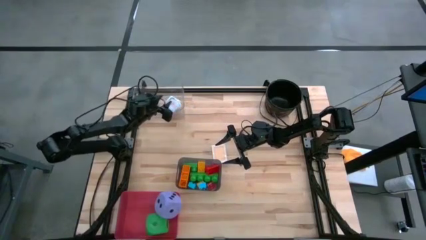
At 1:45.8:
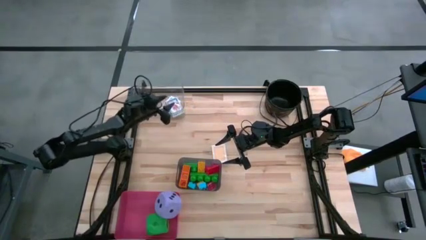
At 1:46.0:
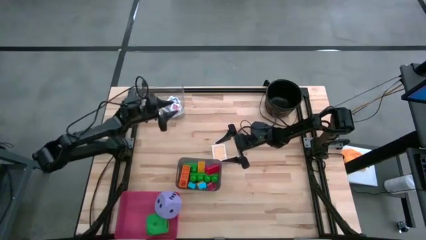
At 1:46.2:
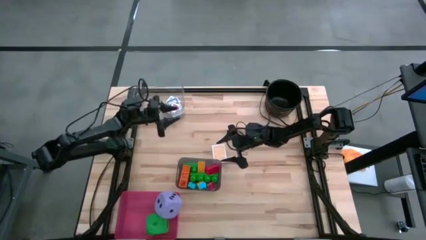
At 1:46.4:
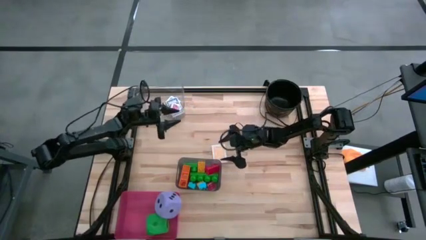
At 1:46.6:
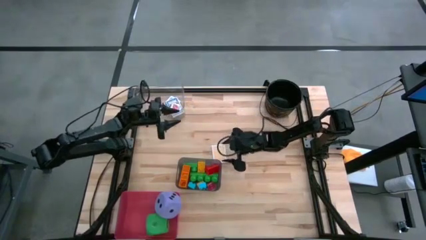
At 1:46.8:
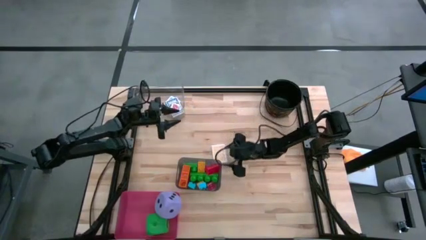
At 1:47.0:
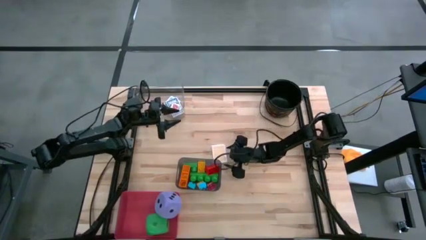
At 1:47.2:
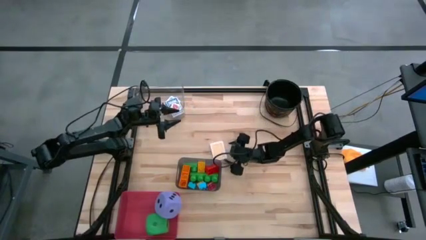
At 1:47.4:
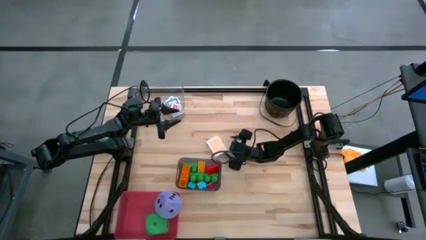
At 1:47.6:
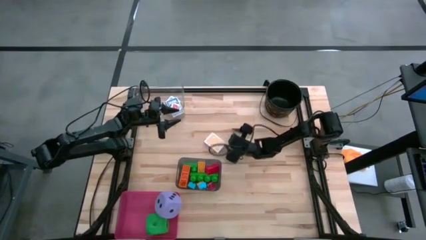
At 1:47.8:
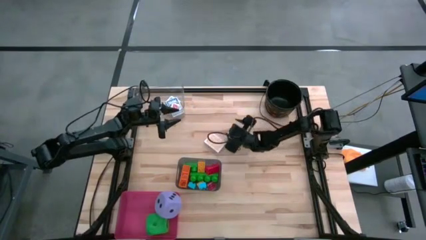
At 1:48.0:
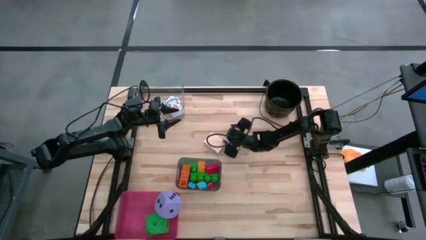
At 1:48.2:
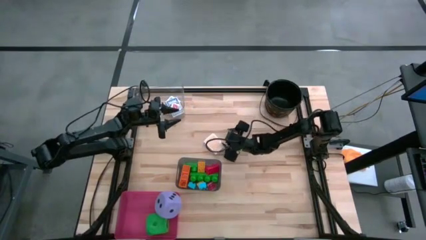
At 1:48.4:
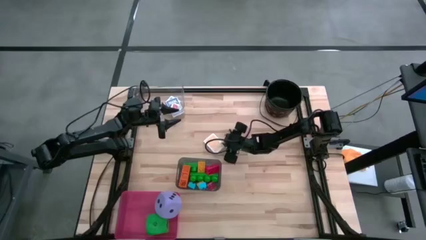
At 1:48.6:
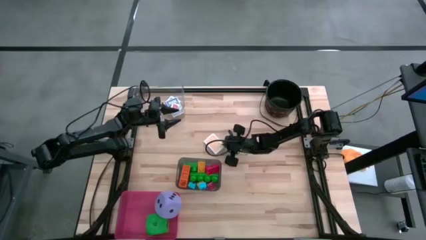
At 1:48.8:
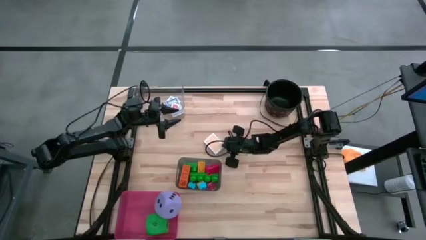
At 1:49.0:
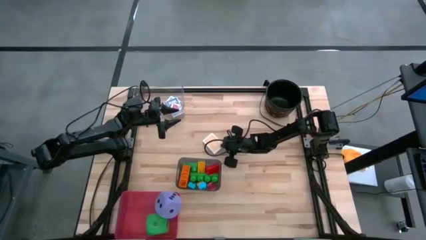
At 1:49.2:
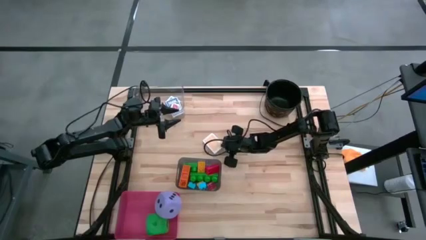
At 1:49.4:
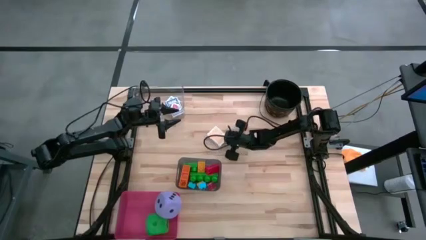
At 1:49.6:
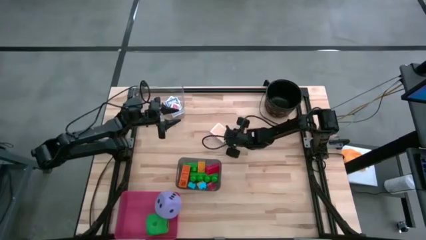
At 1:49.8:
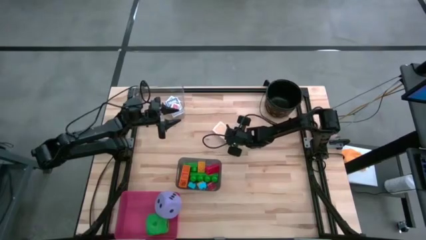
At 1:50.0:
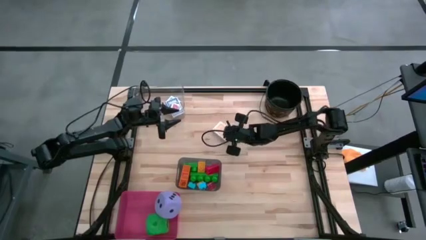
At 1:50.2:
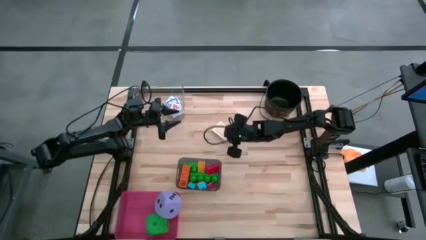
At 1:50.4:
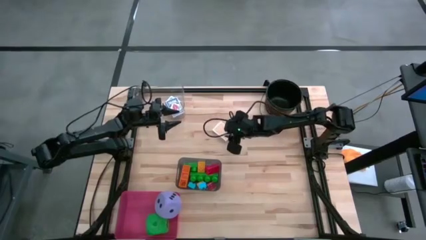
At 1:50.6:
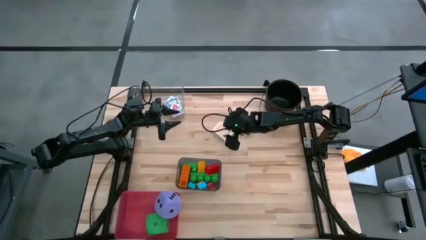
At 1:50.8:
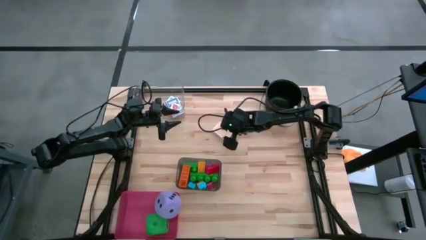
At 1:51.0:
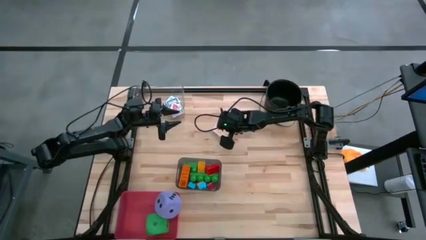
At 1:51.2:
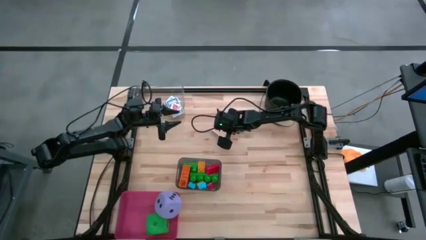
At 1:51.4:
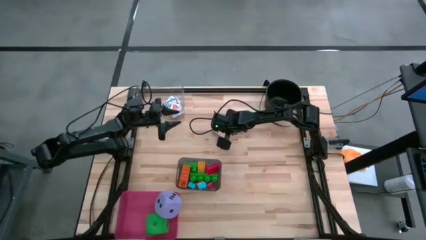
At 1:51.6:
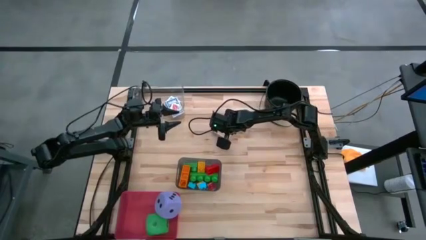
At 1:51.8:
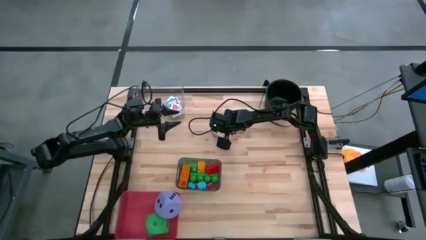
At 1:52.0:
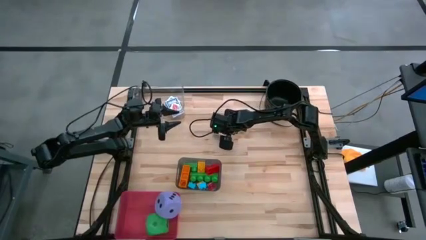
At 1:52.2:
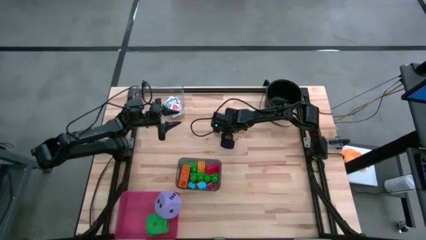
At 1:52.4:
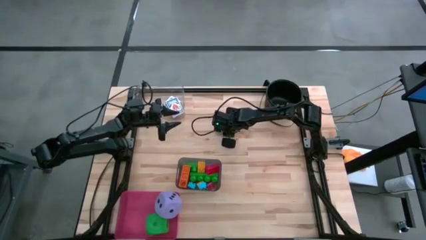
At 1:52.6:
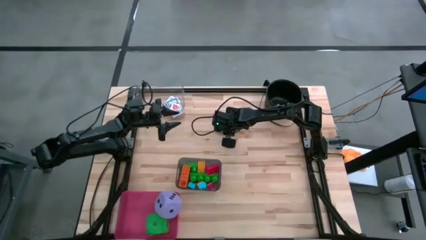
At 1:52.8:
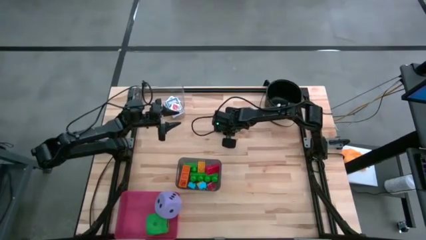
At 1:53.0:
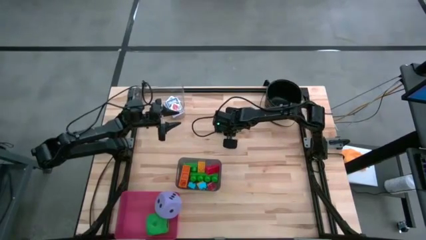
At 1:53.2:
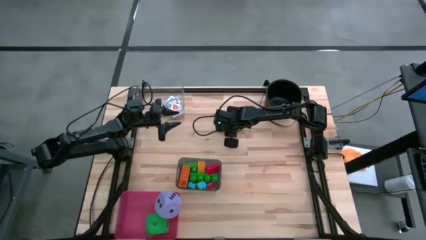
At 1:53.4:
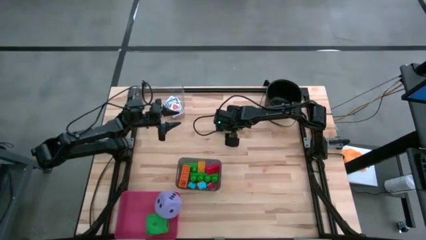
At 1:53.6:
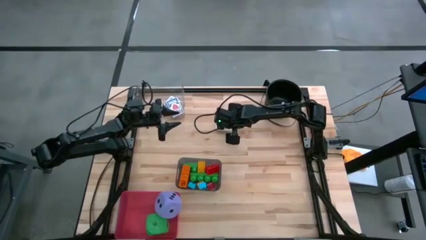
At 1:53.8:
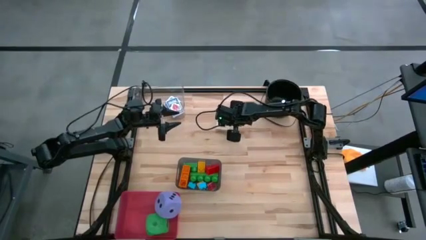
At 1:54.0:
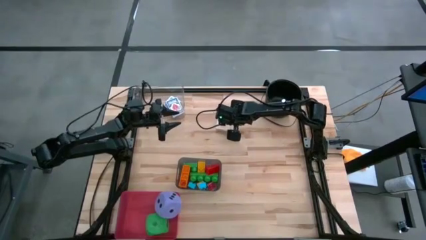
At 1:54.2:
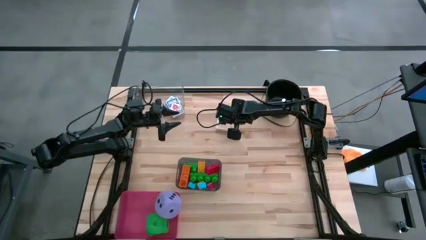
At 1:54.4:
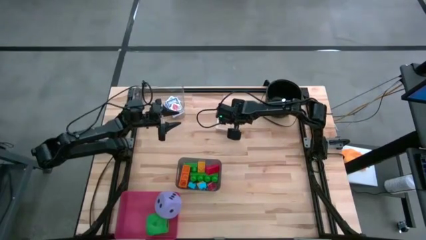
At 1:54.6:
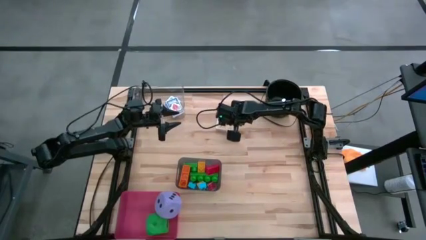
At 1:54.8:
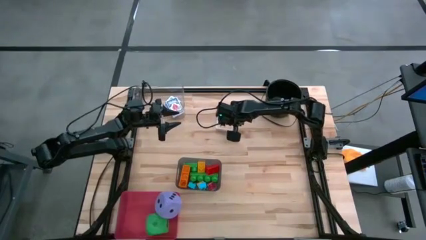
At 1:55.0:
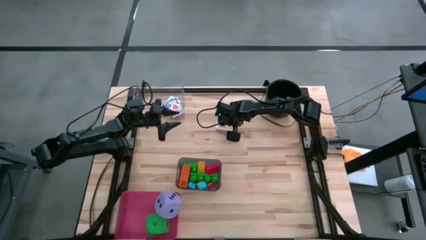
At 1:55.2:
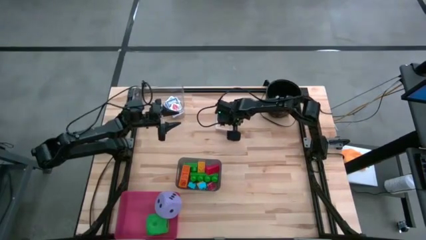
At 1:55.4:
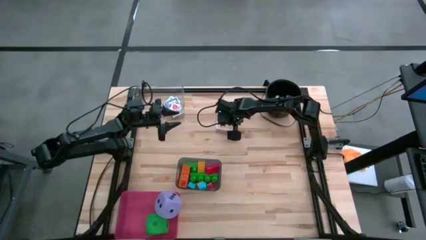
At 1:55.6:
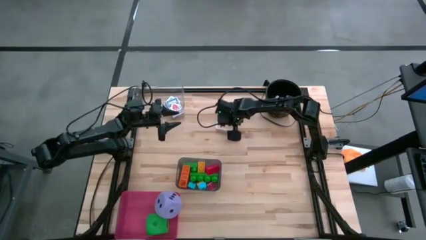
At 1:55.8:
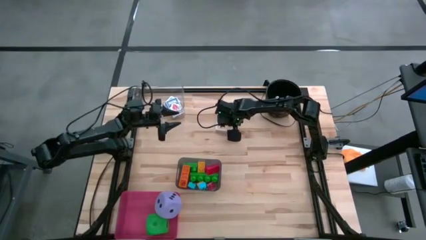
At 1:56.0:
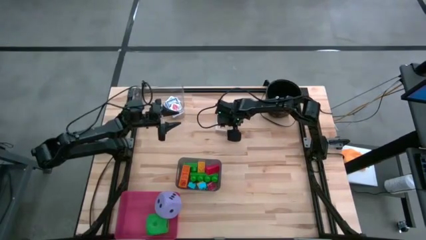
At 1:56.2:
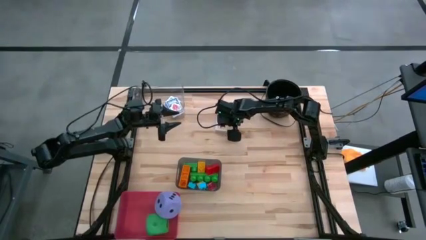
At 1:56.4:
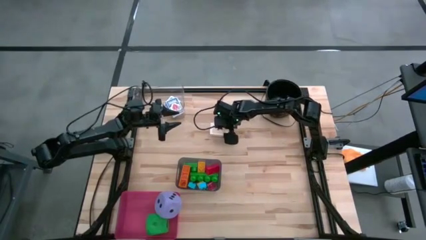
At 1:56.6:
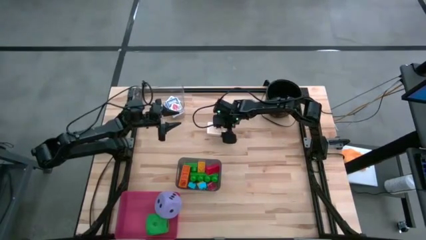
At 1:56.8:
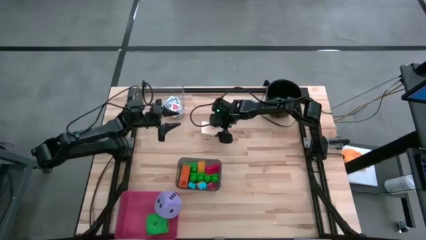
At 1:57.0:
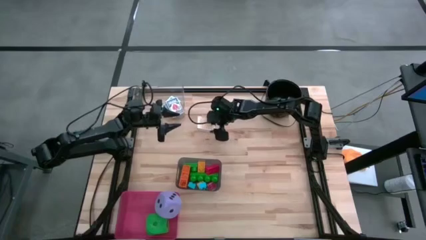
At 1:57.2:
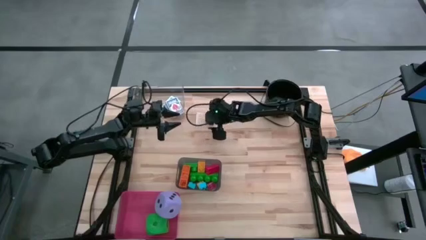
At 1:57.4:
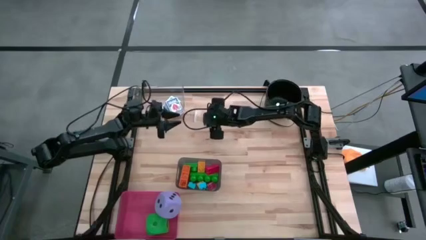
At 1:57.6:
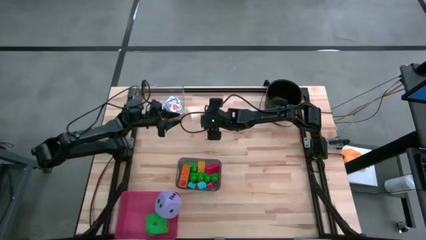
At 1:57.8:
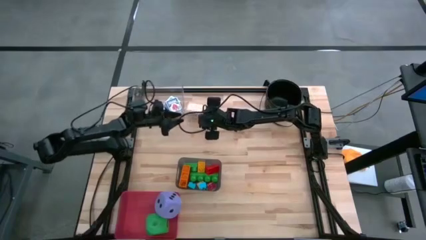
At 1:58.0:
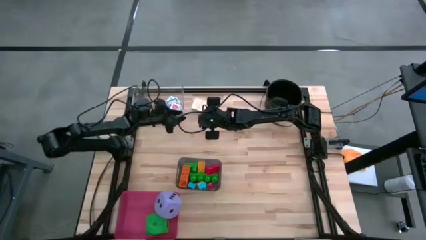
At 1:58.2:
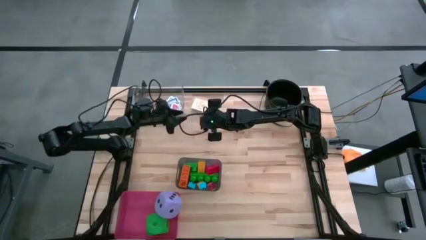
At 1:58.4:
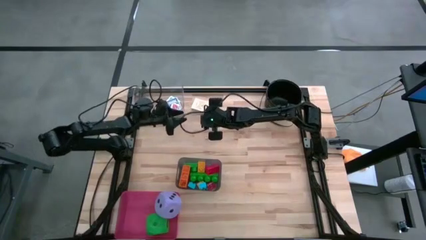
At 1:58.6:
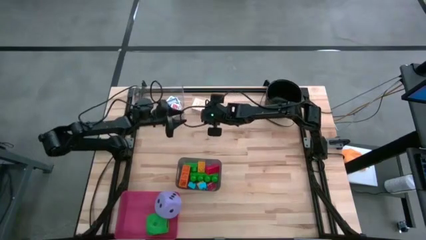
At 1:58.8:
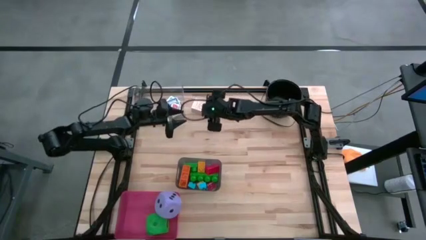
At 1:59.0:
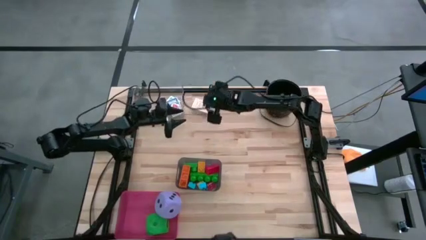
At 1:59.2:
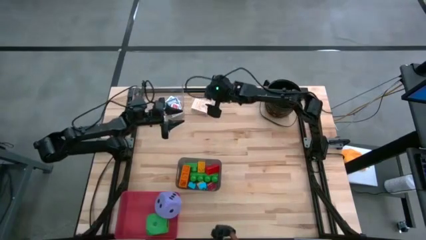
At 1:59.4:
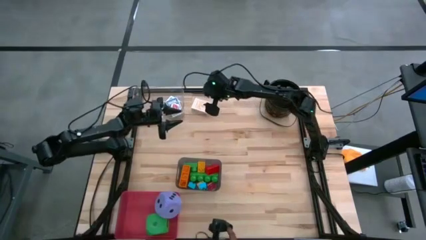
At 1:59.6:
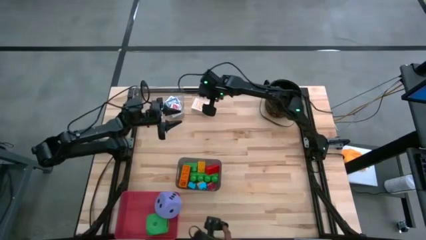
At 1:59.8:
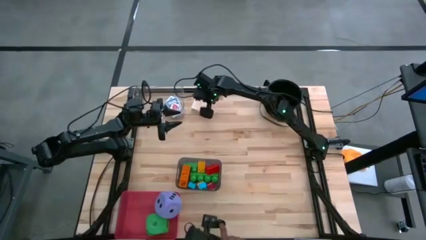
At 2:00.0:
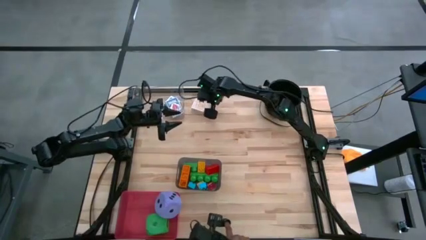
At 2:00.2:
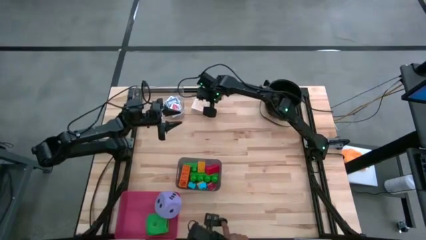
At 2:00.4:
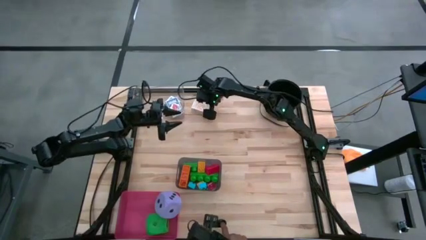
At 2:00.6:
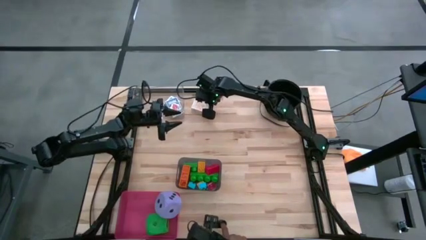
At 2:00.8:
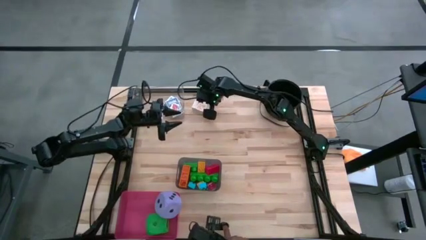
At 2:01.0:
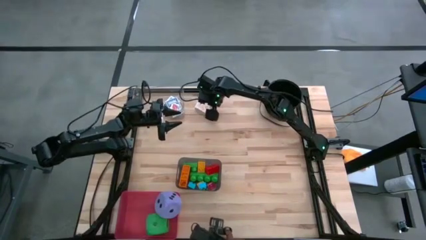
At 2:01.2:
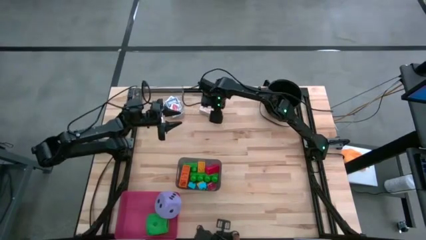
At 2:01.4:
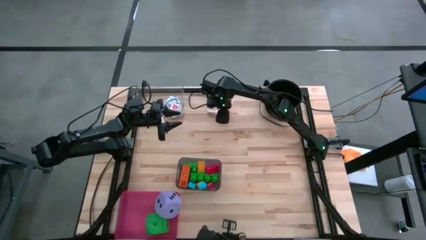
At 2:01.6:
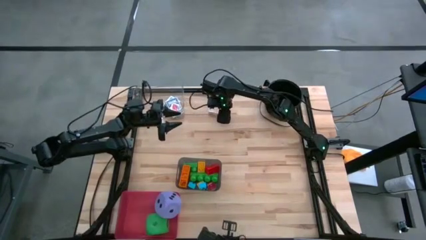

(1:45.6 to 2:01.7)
Task: Pick & Place Toys
Put the yellow playing card into the transparent bin
